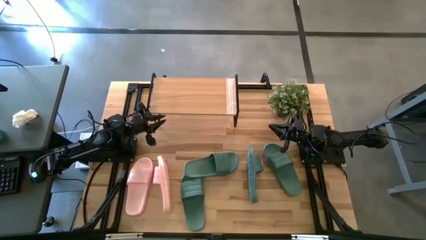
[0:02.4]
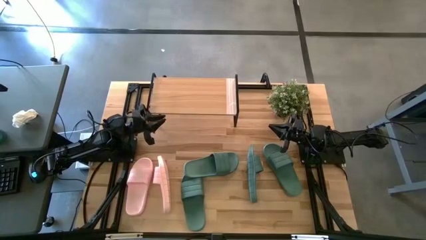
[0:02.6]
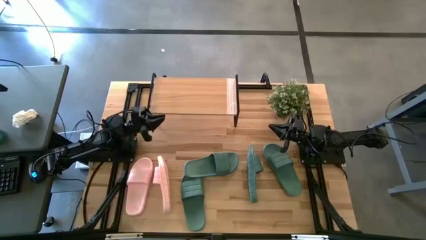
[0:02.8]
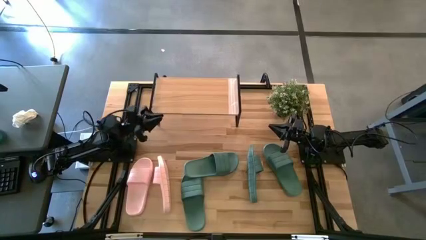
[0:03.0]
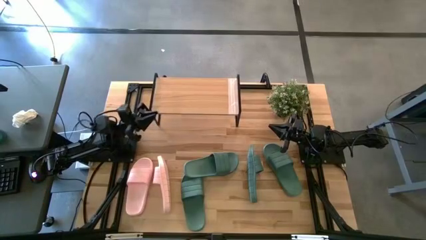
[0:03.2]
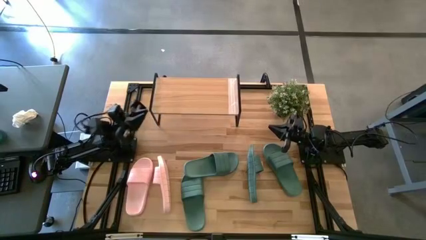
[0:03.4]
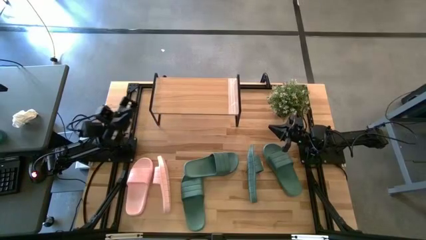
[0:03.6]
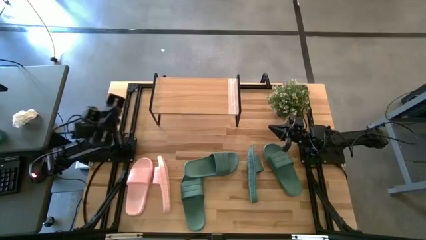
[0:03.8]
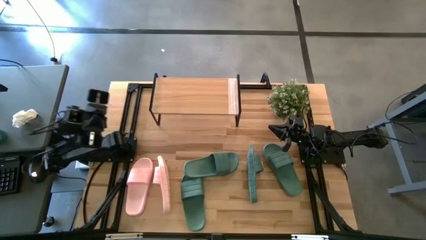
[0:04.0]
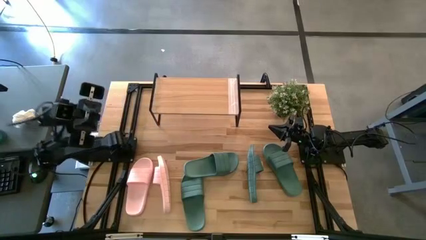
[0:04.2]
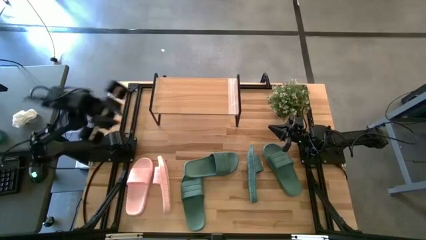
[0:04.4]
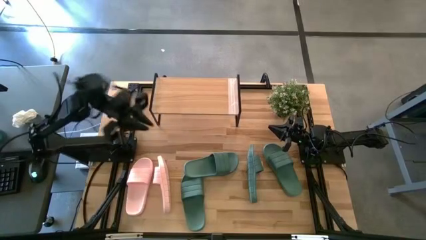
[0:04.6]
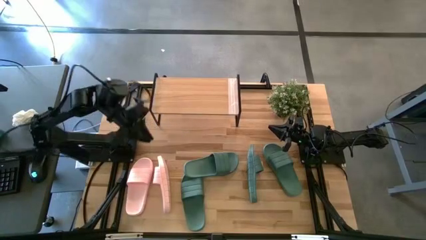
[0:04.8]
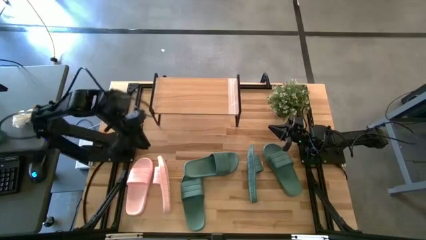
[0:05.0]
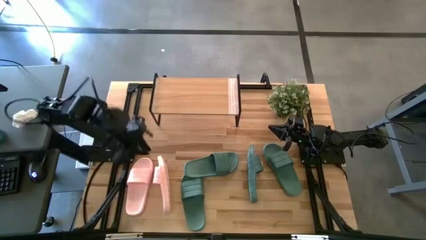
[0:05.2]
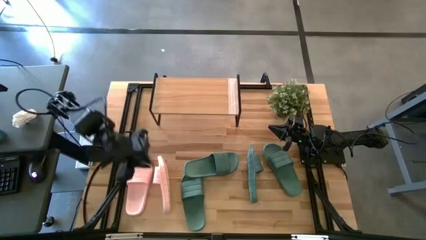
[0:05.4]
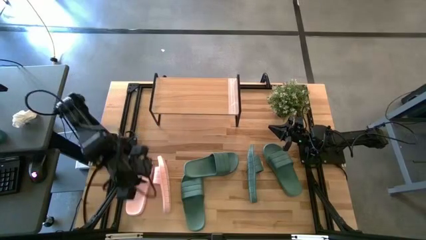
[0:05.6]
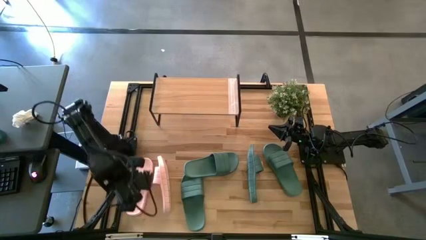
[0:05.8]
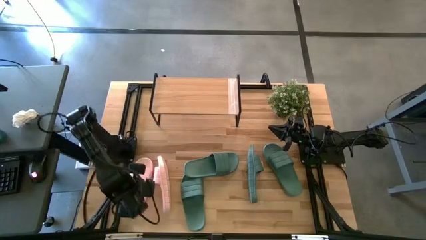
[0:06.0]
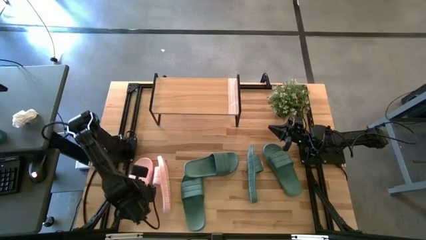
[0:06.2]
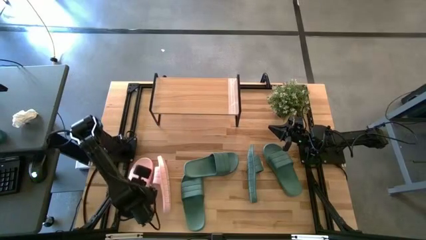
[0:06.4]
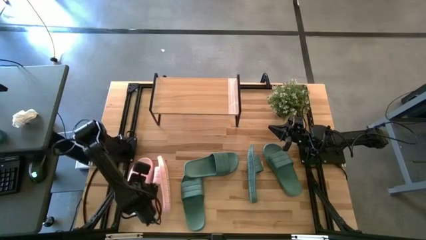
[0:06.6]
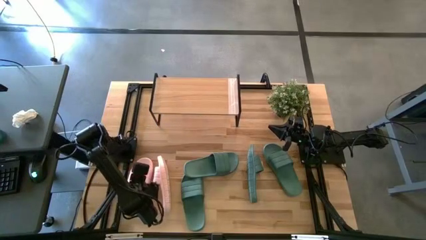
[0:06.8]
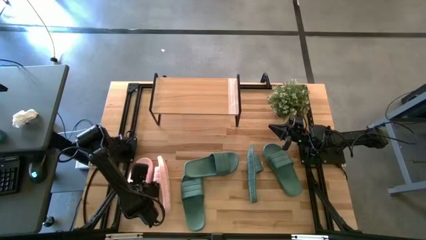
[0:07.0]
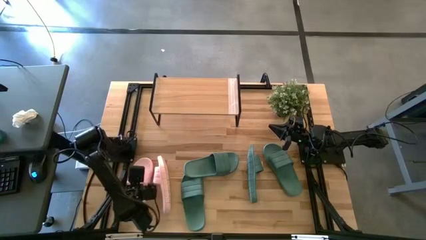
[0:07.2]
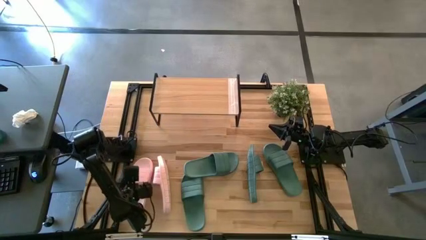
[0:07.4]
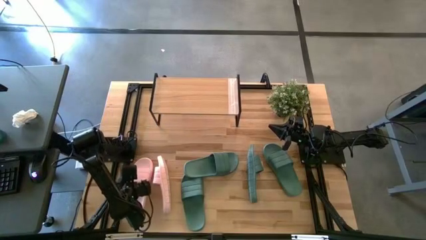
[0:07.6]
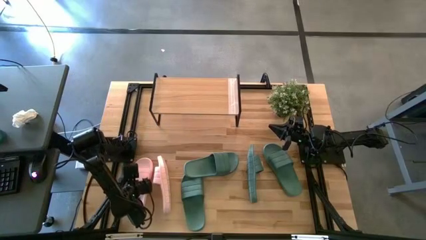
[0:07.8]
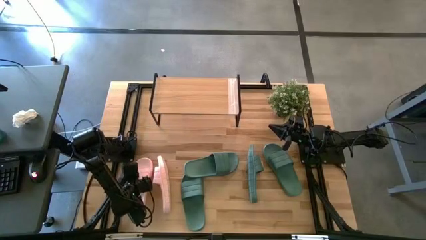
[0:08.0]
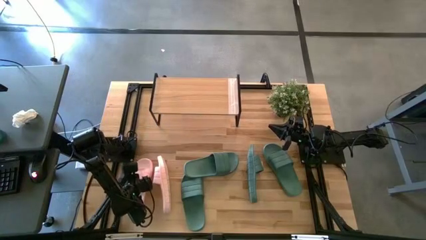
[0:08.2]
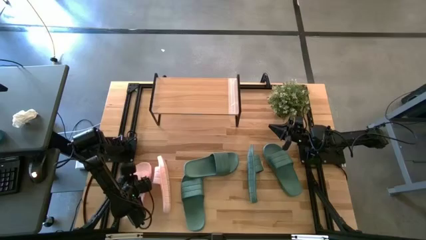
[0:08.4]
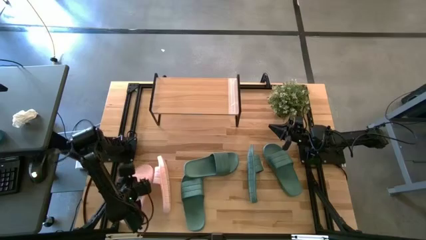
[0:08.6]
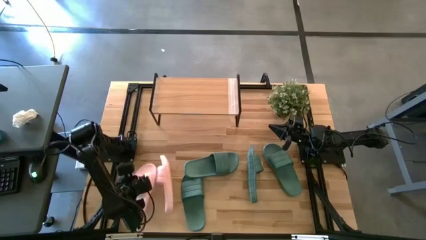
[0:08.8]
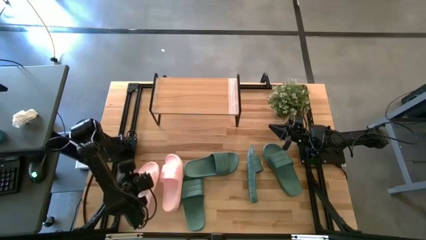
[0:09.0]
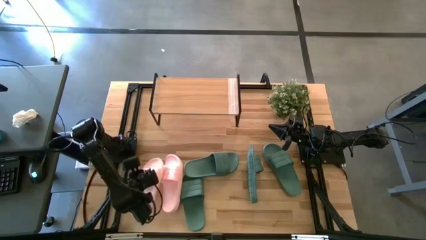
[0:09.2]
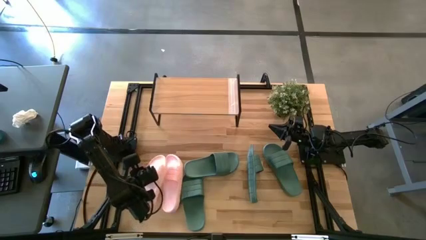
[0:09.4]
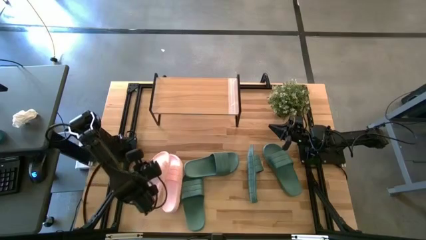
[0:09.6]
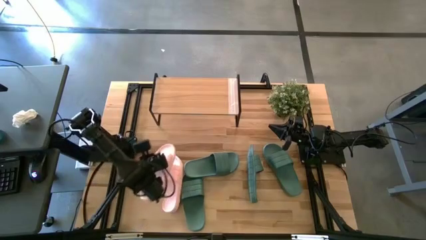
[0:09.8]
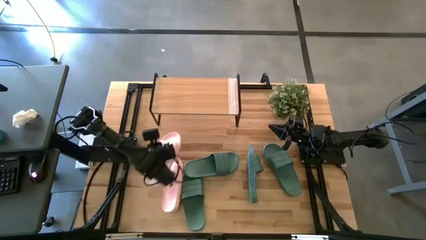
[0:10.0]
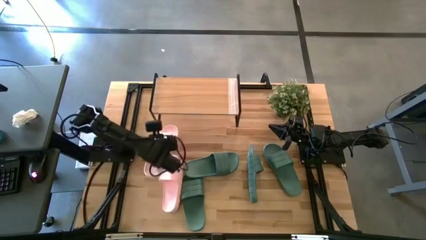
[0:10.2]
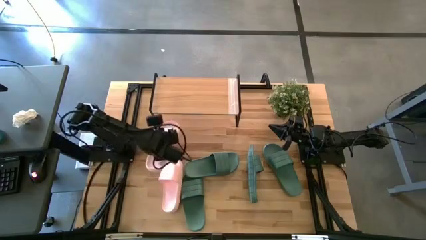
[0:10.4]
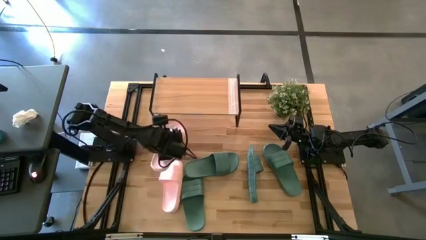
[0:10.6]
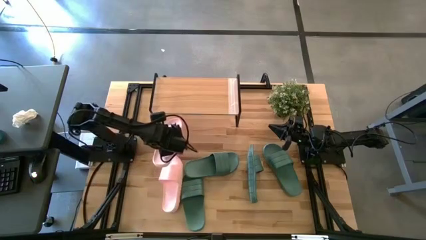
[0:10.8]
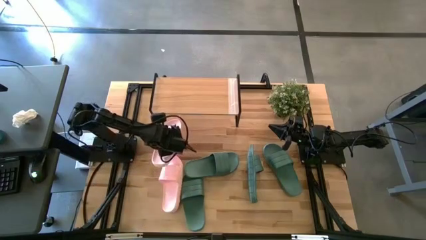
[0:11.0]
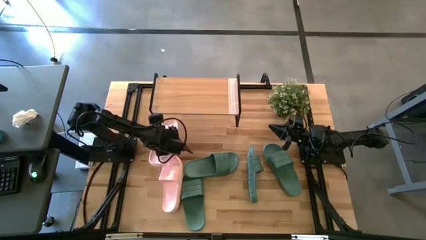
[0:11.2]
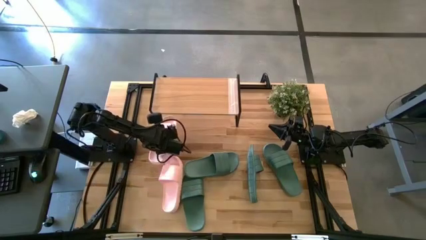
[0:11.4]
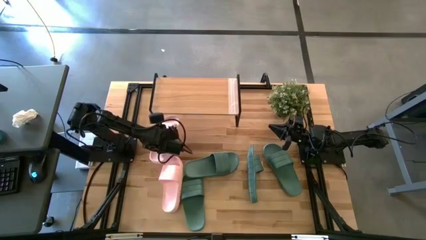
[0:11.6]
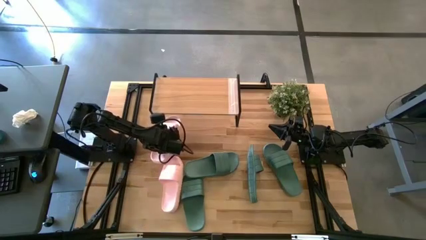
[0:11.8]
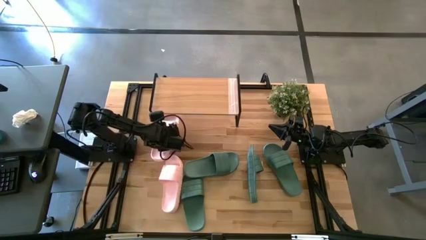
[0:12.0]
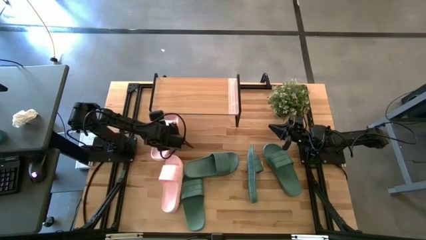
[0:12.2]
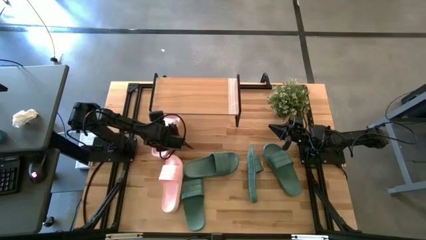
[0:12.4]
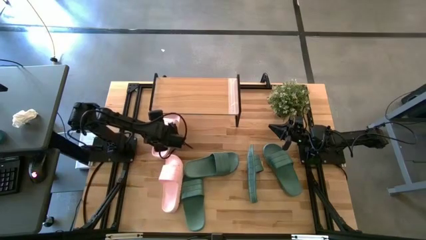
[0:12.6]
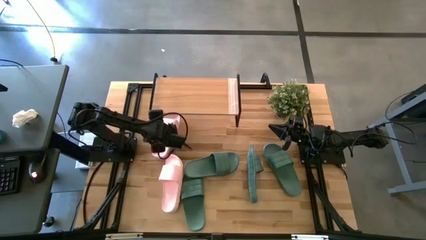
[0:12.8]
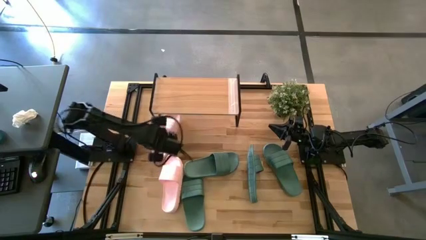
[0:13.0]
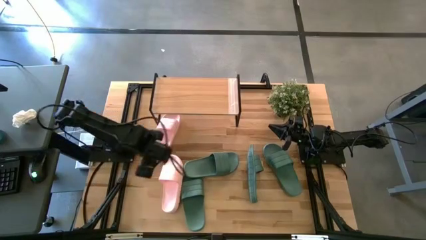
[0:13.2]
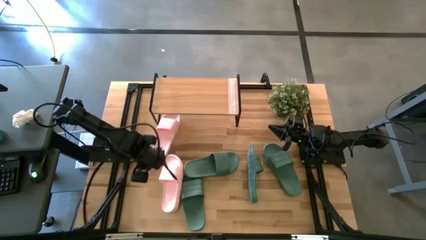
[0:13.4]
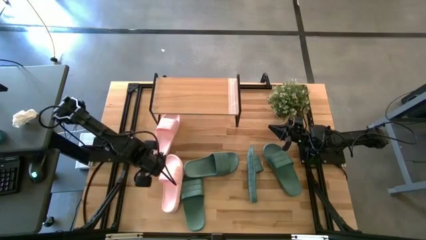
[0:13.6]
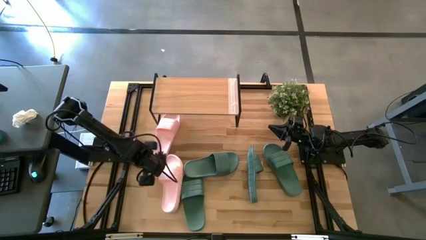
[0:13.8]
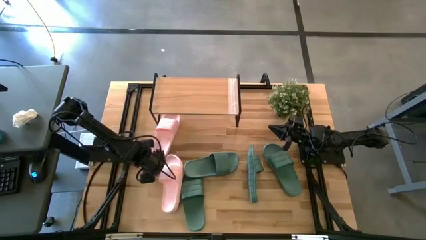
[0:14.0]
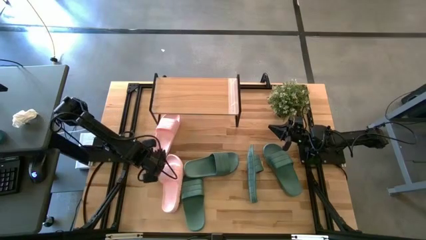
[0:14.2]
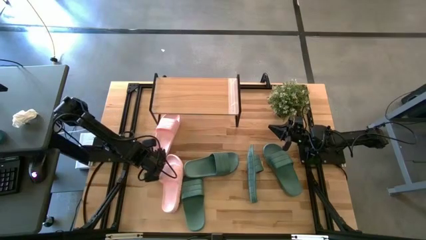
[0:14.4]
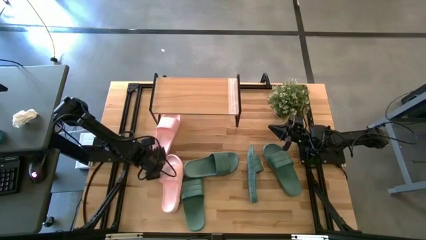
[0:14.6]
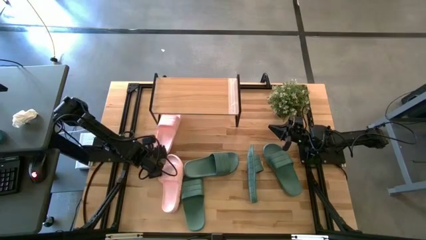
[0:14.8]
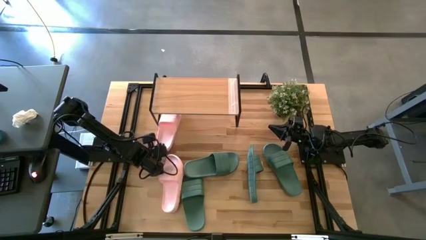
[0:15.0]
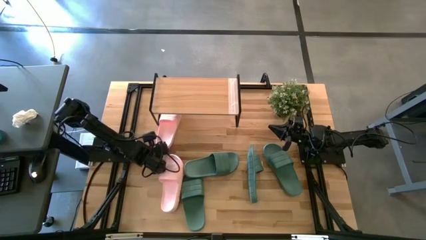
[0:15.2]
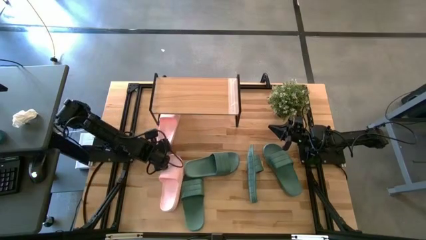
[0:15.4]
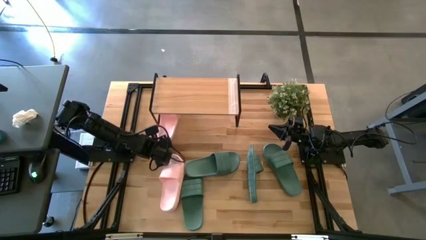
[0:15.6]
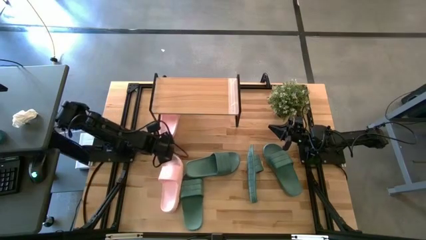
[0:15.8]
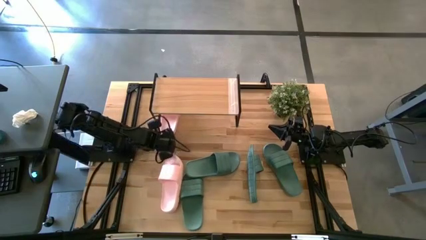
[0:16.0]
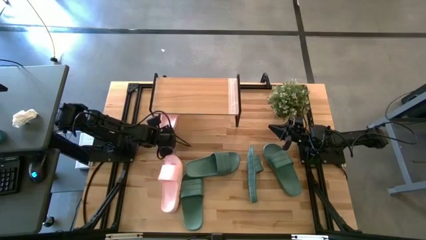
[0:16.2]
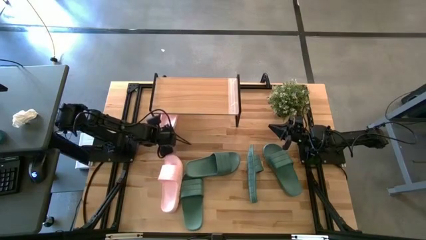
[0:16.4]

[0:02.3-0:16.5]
Task: Pick and place slides into the shelf
Put the left white slipper on the bottom shelf
